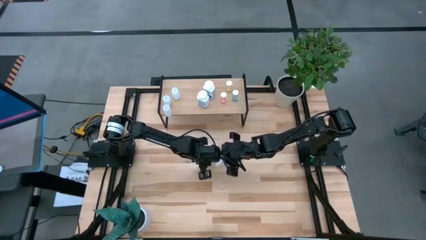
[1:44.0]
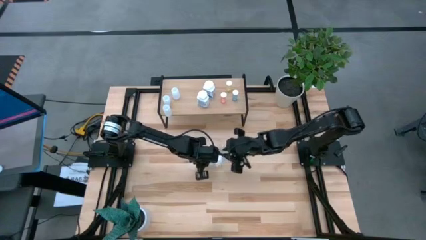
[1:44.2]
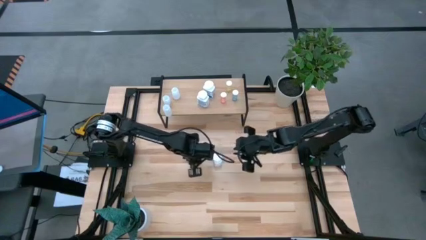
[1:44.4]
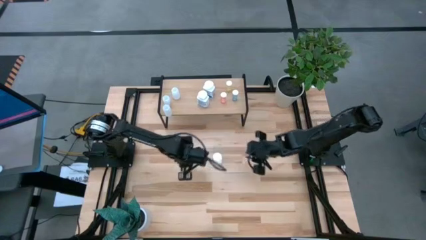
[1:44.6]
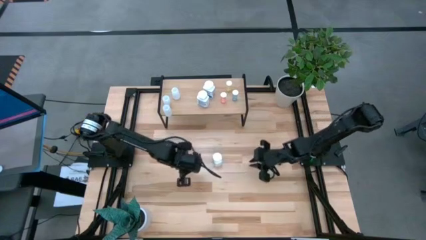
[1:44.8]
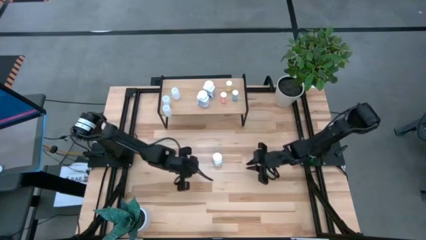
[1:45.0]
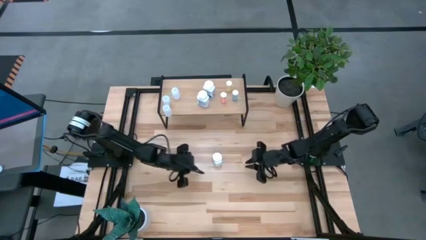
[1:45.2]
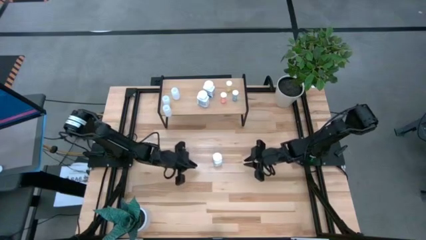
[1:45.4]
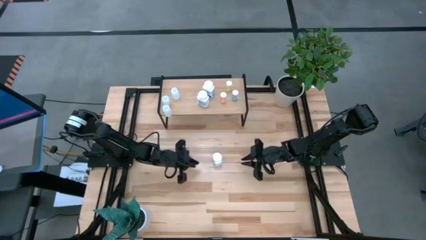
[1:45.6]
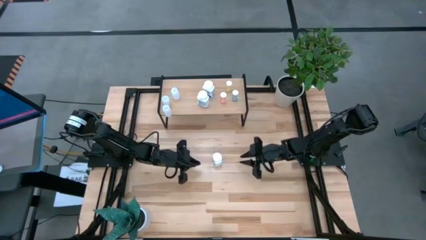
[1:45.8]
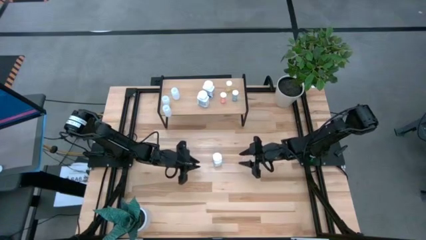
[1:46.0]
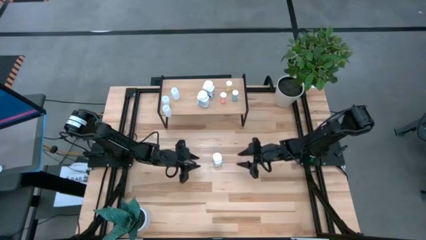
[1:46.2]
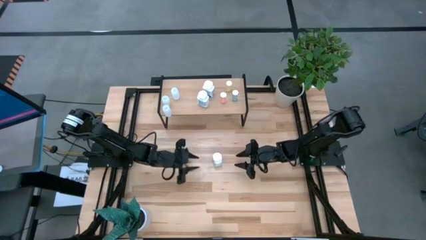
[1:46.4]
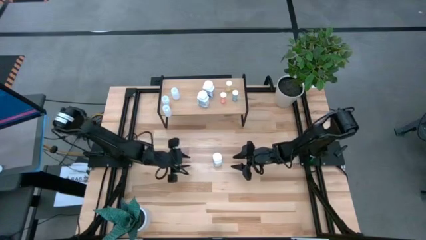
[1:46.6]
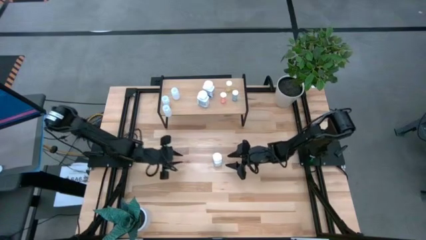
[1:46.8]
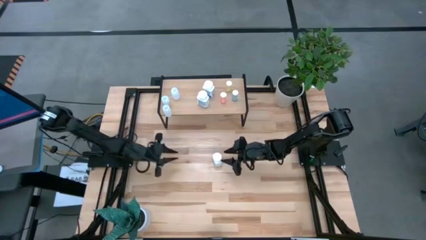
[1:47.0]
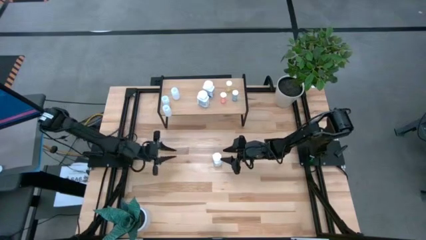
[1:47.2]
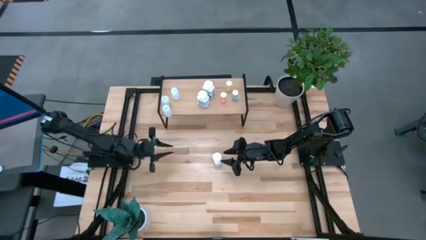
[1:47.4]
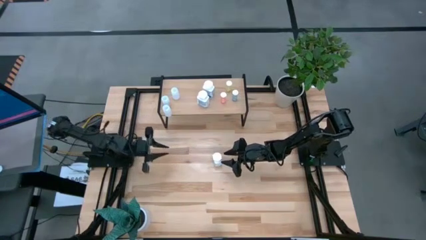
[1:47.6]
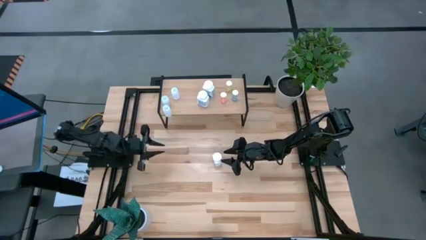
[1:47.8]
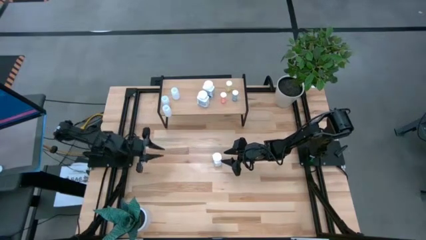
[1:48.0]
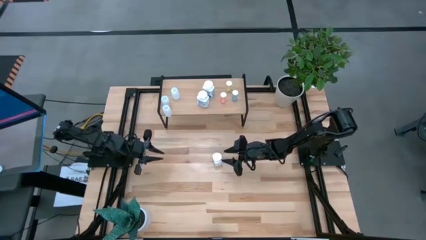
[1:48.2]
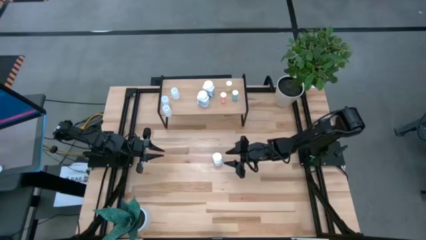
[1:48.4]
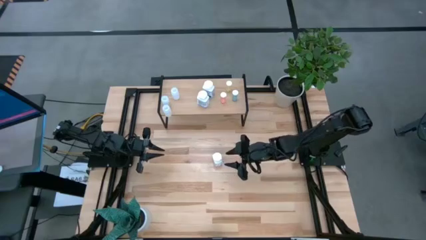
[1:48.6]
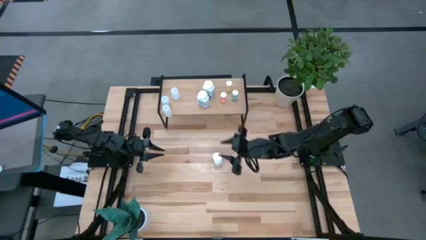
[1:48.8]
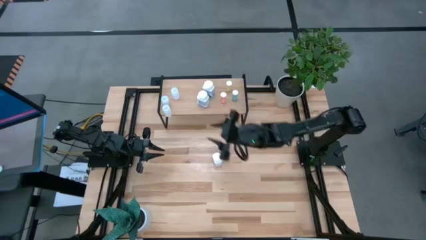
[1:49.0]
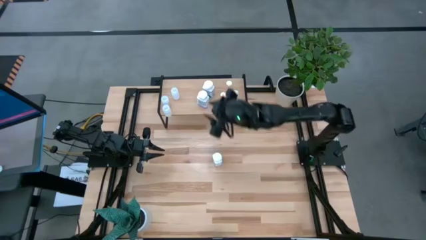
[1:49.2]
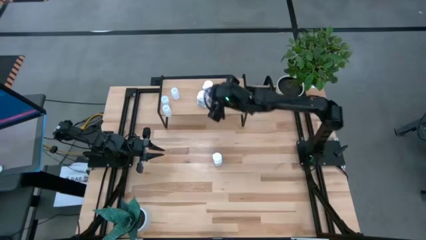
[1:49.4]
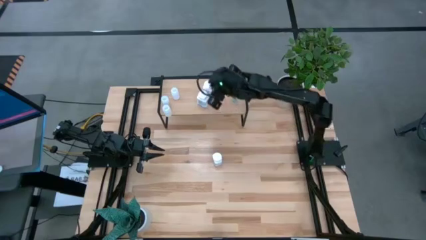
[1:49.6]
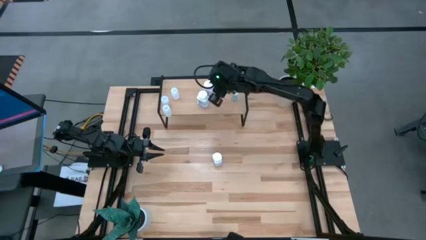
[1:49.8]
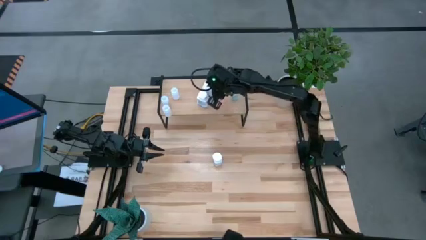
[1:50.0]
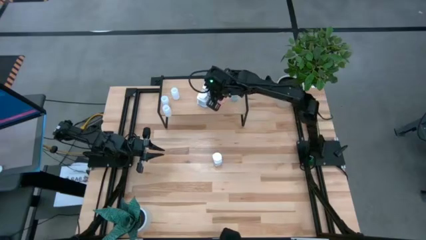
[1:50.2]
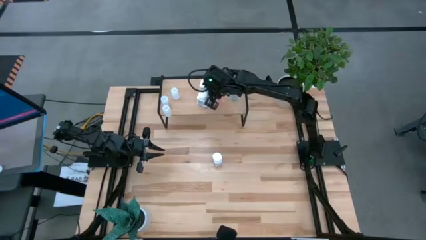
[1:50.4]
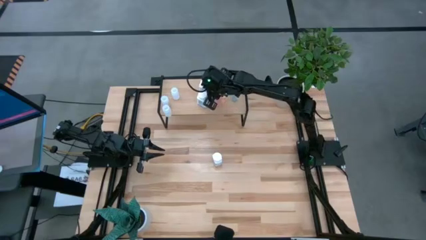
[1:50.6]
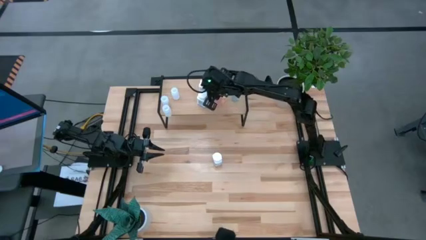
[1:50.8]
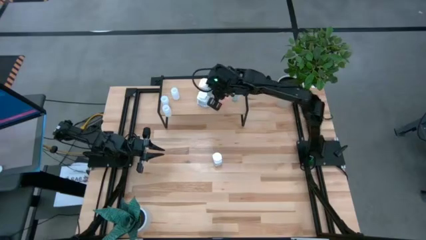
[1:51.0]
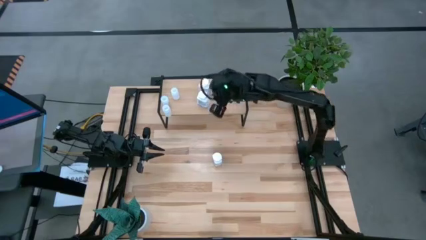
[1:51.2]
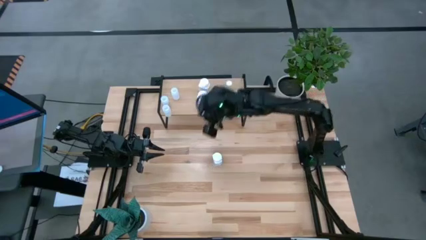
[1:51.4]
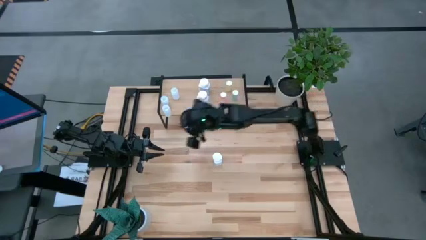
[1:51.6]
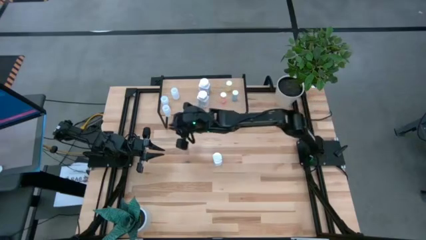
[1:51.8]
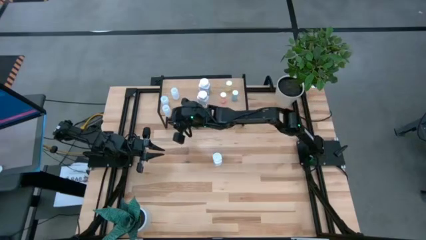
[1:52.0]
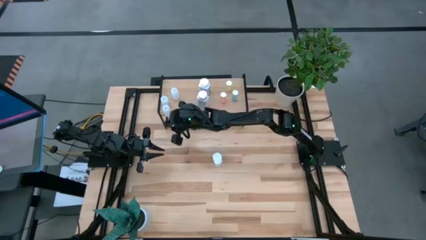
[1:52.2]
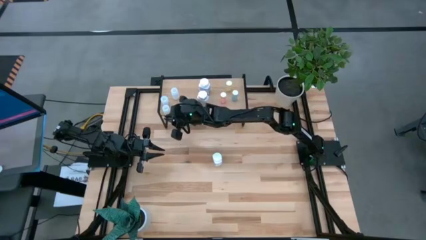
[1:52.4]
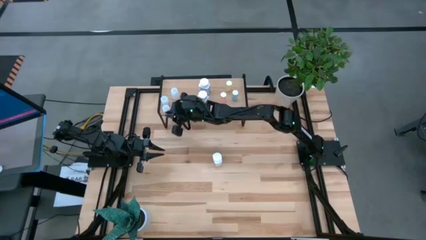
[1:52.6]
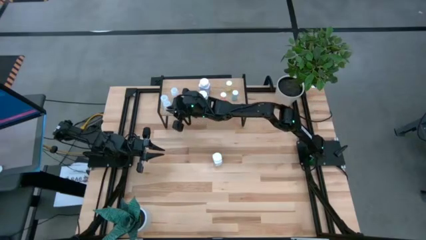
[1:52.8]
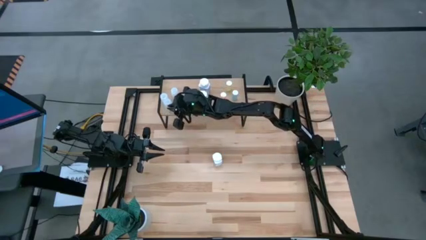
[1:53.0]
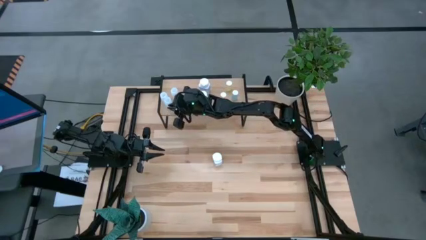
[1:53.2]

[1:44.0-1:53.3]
Task: Pick and place medicine bottles onto shelf by color
Adjust the pill bottles on the shelf

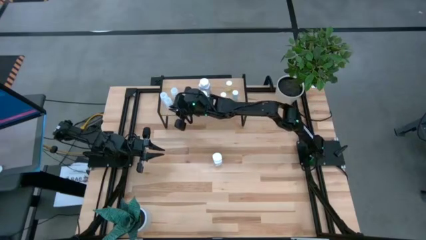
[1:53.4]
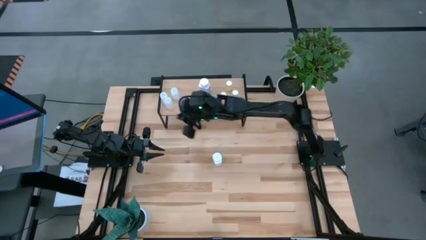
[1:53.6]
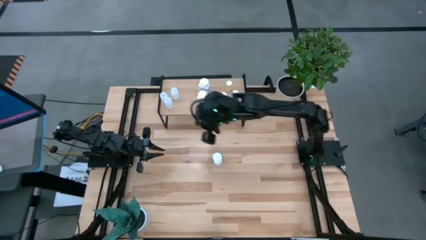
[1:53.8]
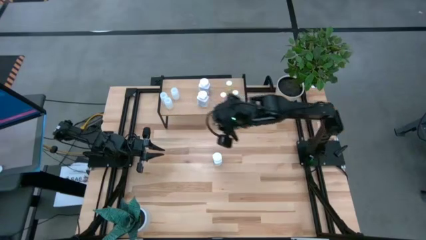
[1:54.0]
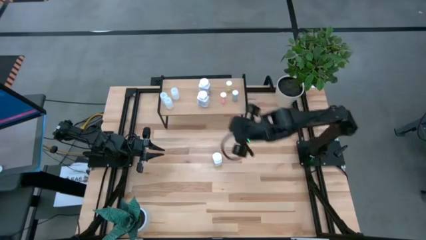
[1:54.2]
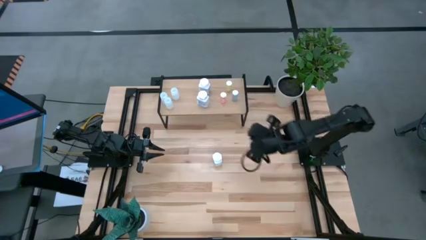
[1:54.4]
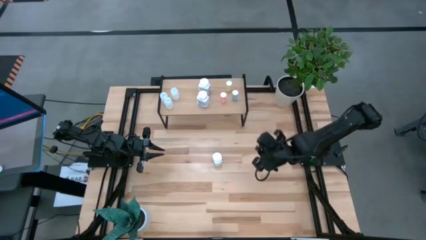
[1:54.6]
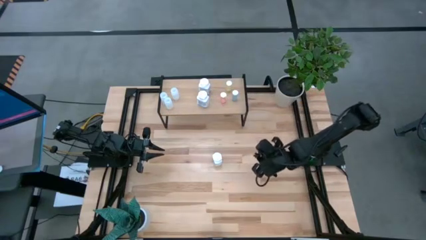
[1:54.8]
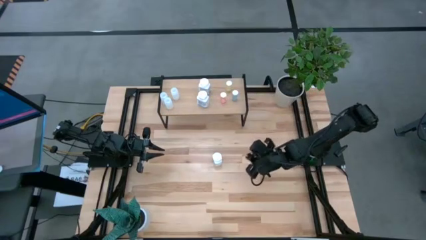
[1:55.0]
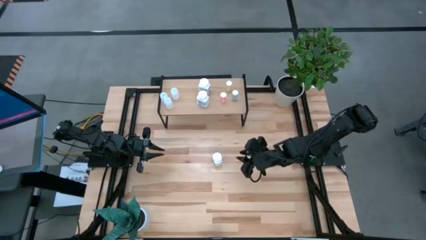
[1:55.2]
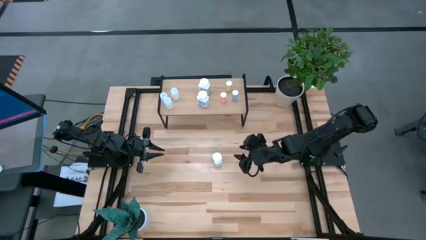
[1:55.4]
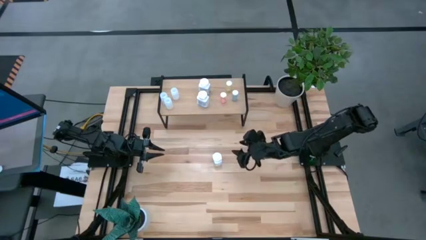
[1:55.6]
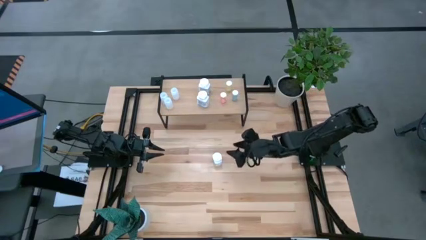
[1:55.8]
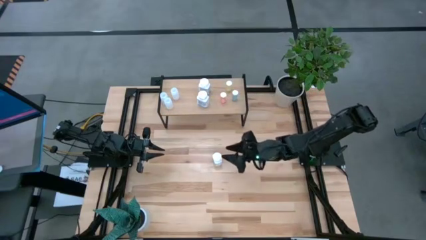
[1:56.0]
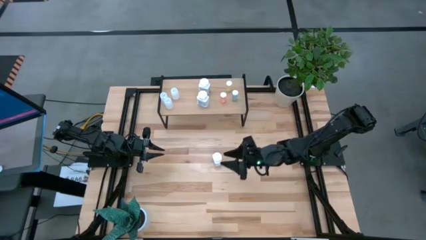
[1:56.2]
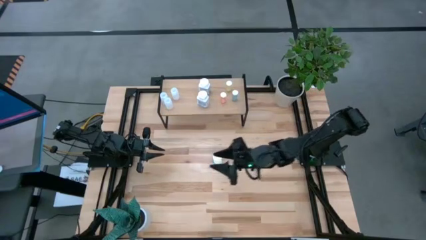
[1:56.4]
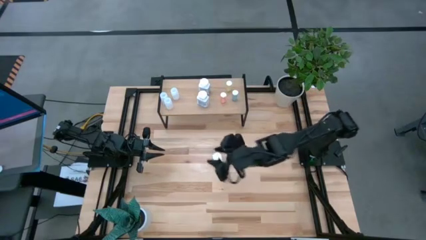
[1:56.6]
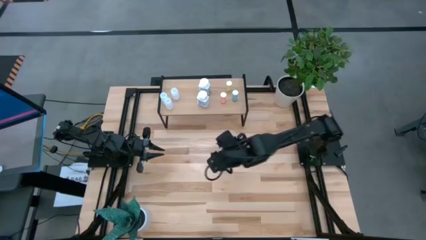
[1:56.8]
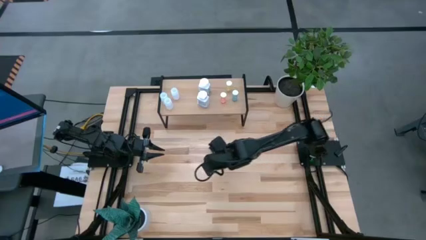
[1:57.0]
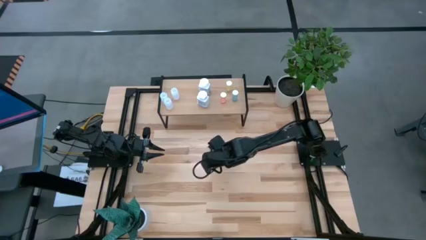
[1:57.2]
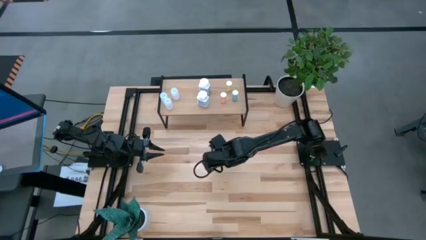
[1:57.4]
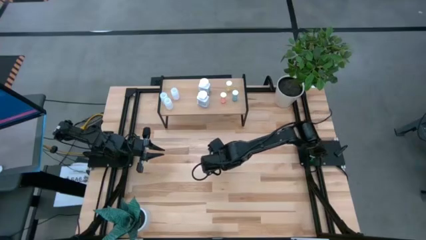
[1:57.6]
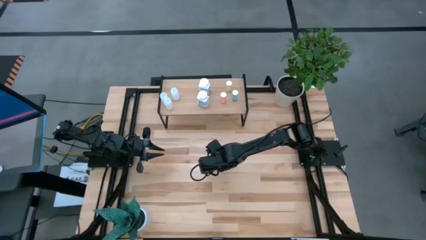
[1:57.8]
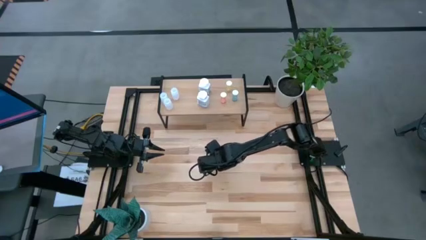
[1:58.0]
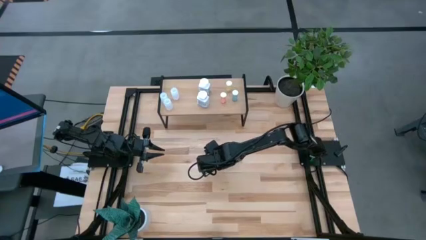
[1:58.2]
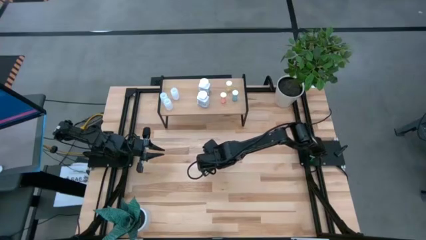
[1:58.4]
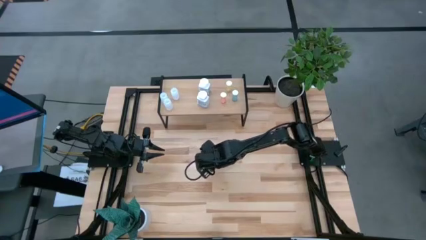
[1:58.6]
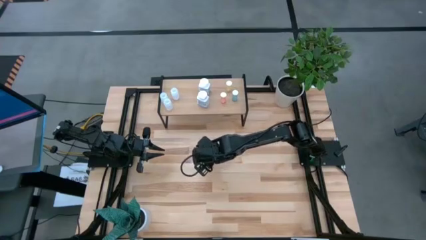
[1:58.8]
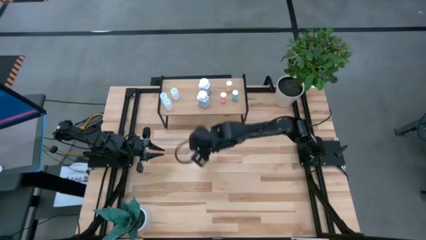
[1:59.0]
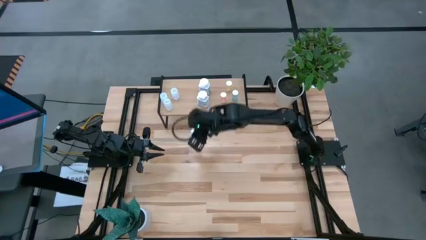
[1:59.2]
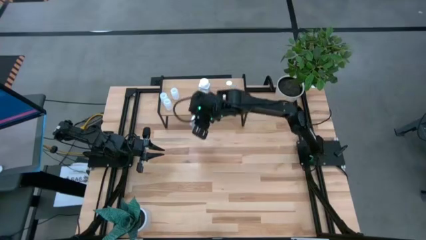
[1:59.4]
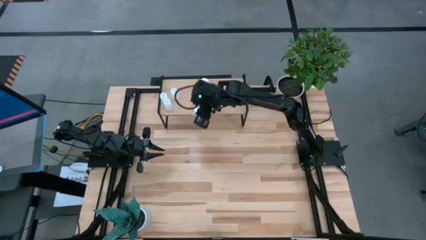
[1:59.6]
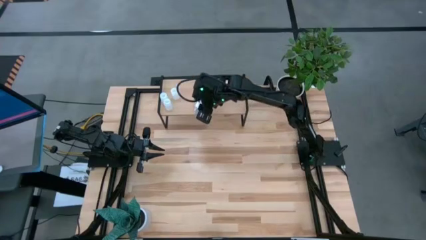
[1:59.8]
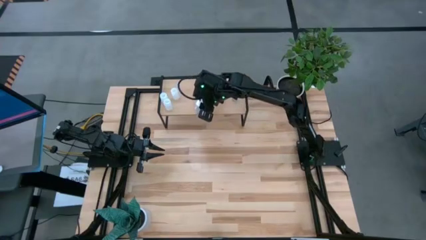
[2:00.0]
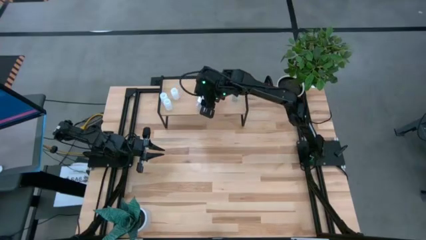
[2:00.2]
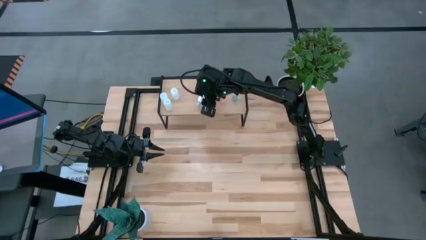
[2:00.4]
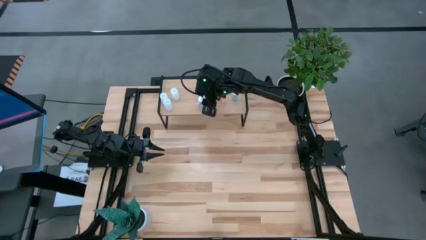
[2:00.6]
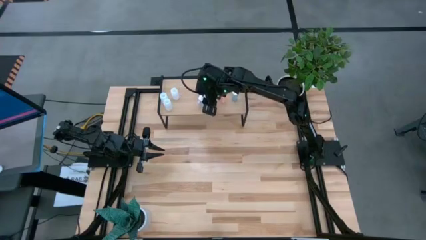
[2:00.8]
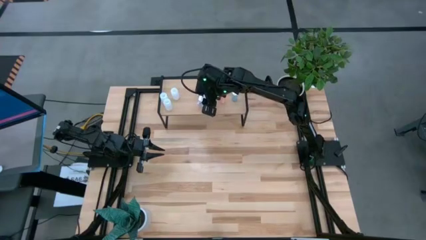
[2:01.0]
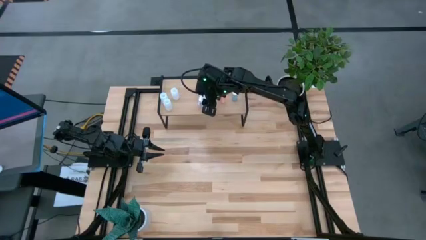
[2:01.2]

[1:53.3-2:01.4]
Put the white pill bottle on the shelf
